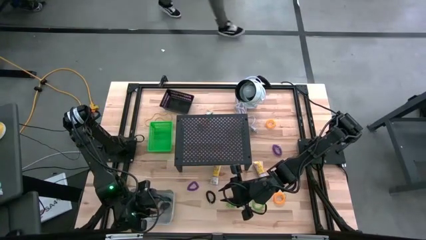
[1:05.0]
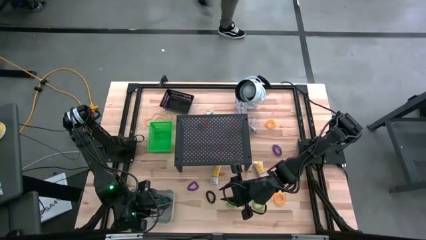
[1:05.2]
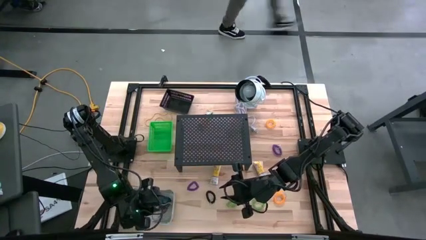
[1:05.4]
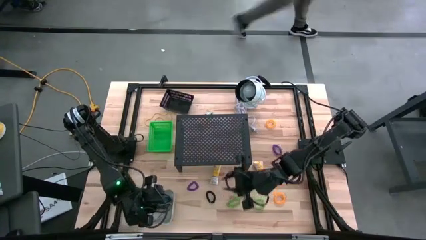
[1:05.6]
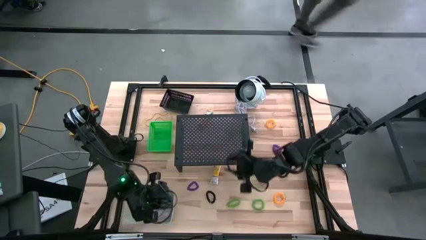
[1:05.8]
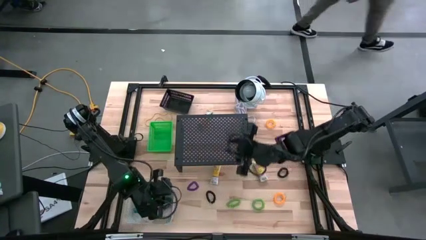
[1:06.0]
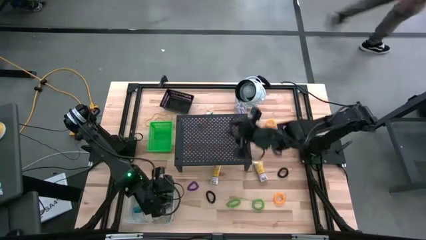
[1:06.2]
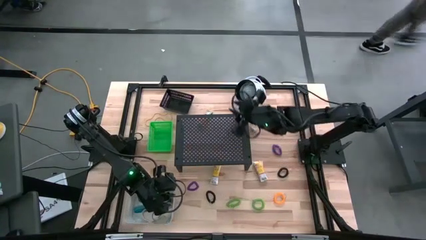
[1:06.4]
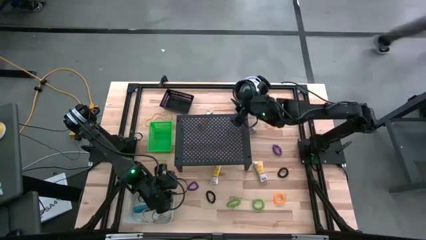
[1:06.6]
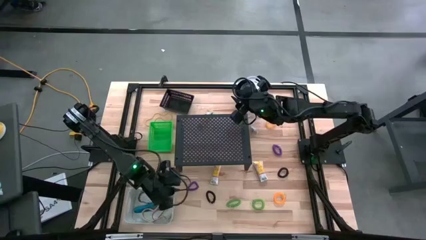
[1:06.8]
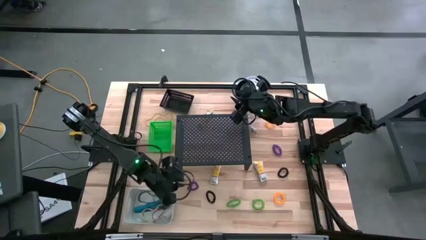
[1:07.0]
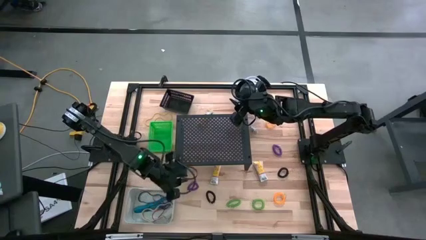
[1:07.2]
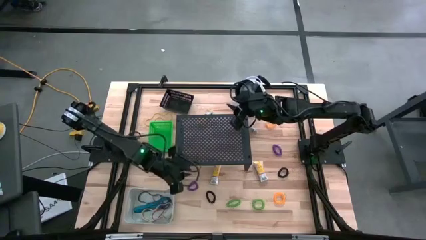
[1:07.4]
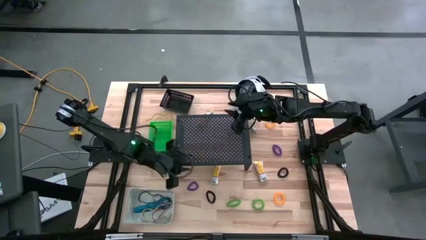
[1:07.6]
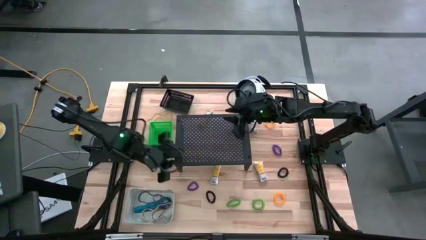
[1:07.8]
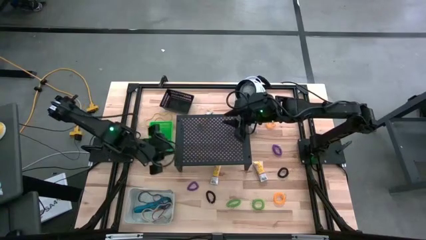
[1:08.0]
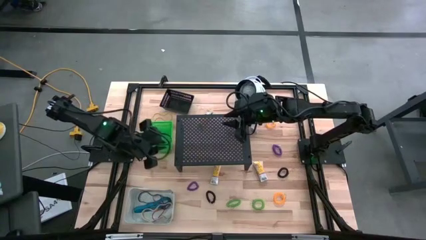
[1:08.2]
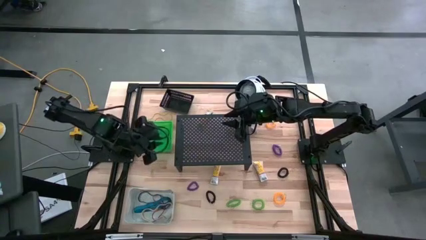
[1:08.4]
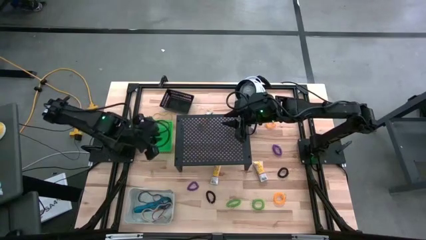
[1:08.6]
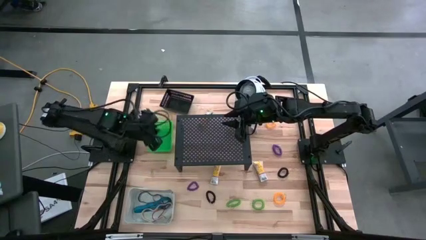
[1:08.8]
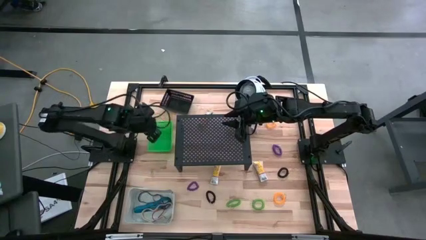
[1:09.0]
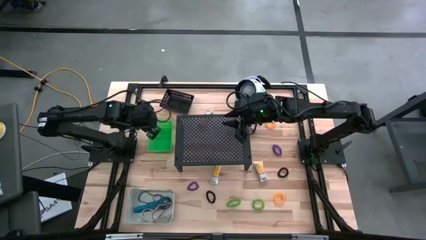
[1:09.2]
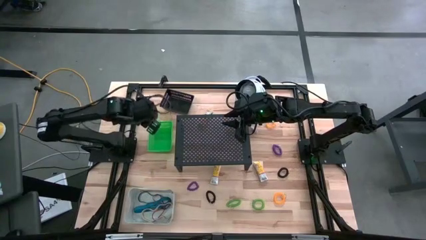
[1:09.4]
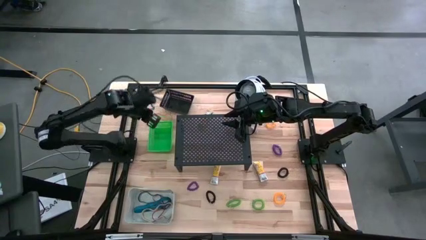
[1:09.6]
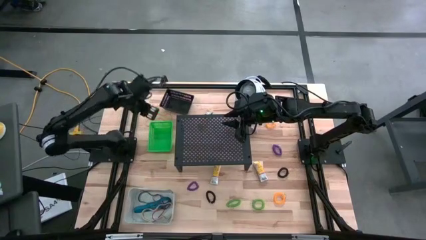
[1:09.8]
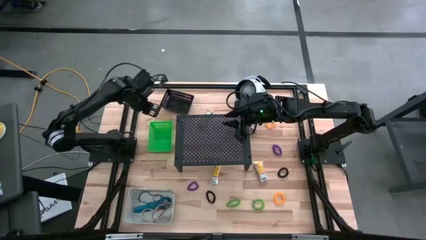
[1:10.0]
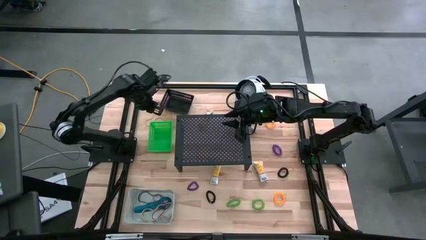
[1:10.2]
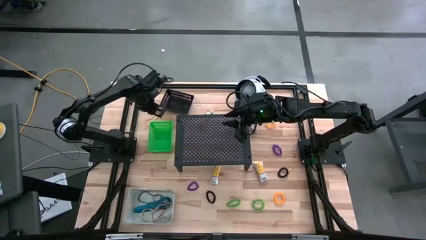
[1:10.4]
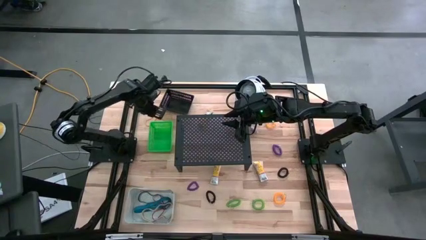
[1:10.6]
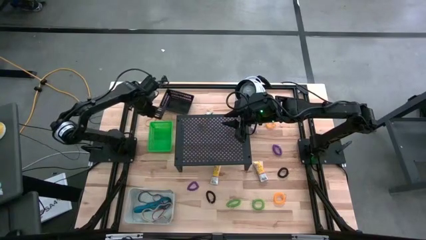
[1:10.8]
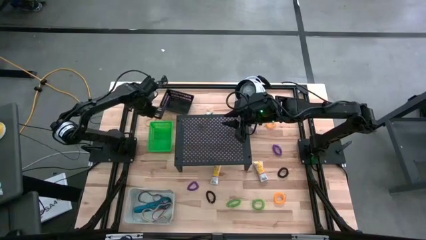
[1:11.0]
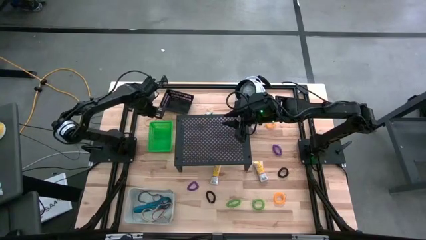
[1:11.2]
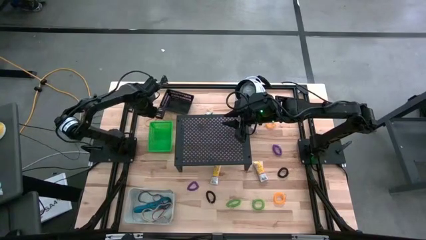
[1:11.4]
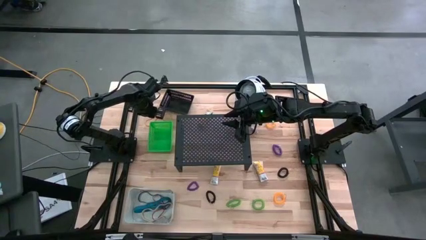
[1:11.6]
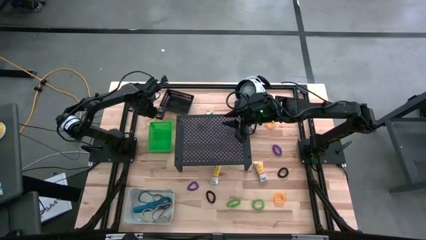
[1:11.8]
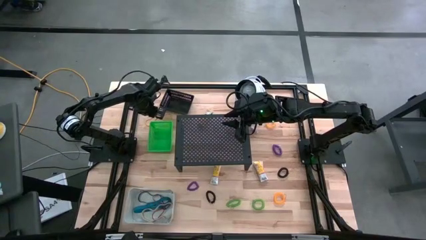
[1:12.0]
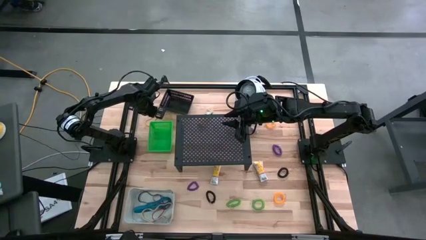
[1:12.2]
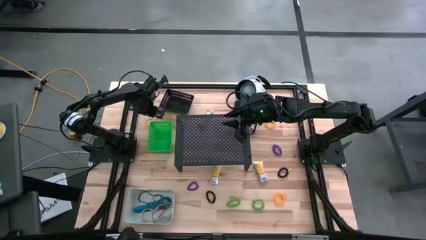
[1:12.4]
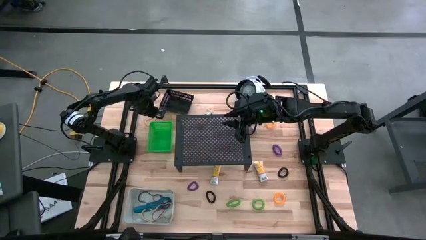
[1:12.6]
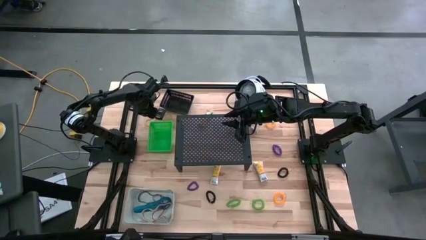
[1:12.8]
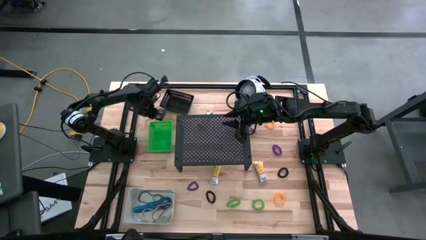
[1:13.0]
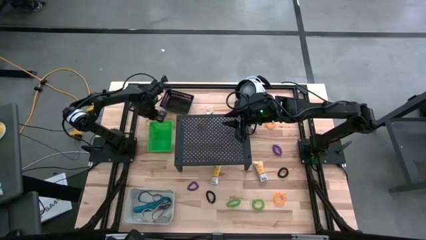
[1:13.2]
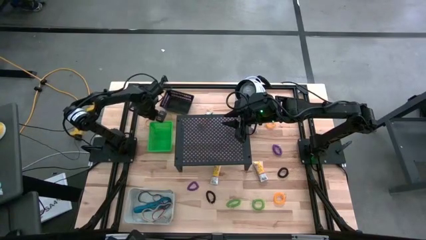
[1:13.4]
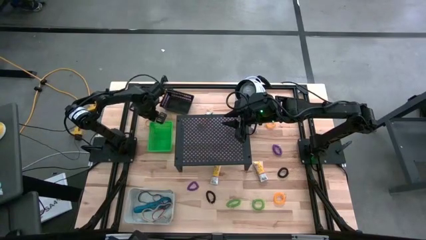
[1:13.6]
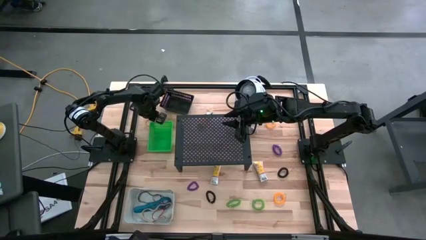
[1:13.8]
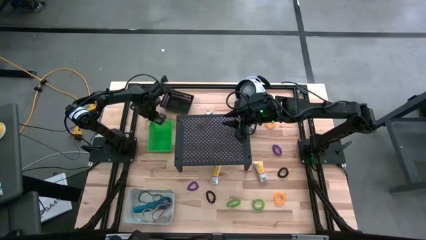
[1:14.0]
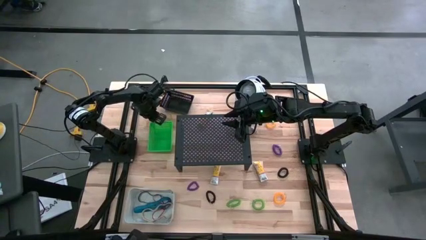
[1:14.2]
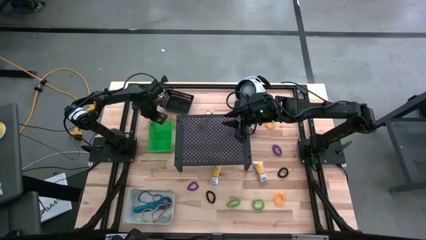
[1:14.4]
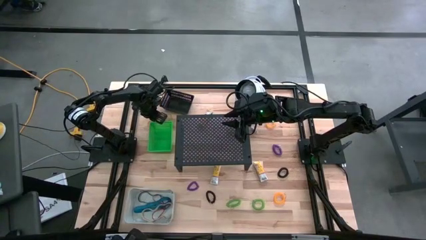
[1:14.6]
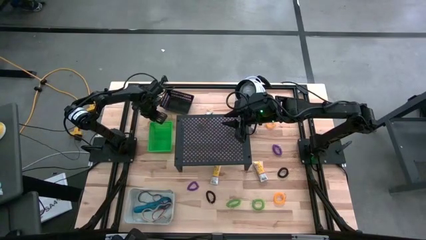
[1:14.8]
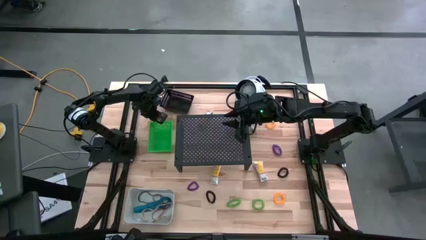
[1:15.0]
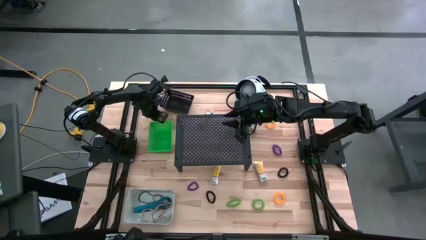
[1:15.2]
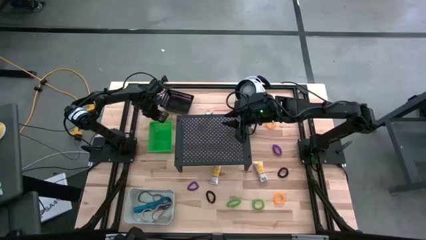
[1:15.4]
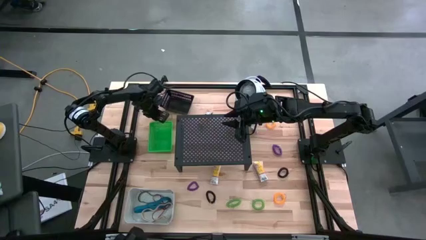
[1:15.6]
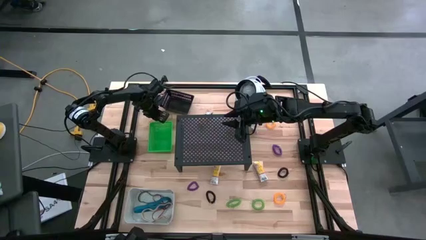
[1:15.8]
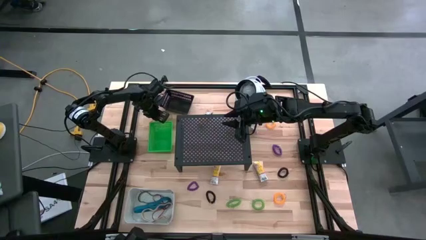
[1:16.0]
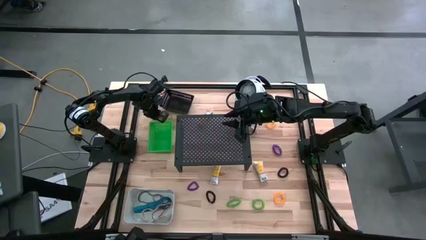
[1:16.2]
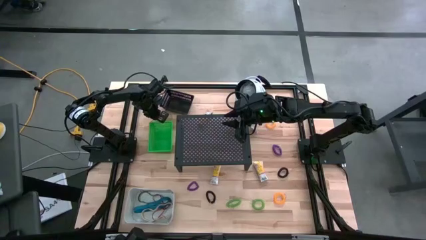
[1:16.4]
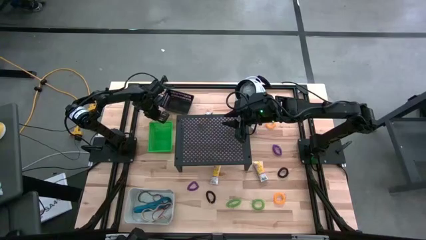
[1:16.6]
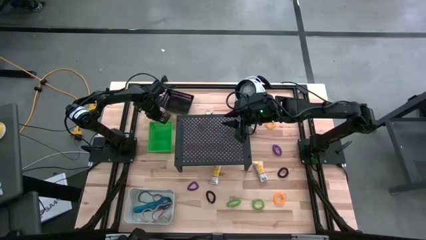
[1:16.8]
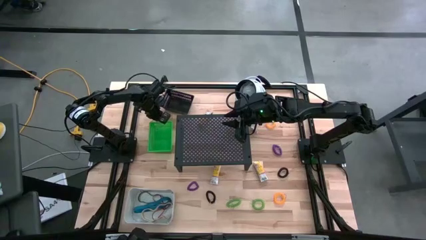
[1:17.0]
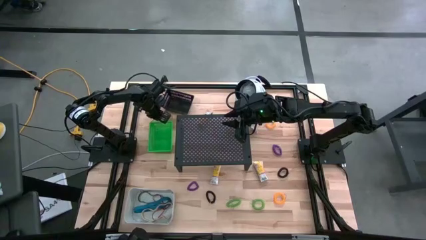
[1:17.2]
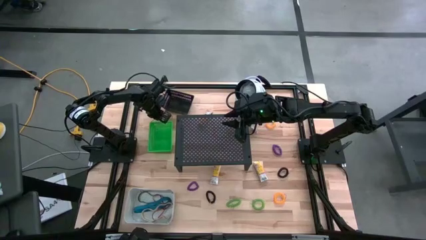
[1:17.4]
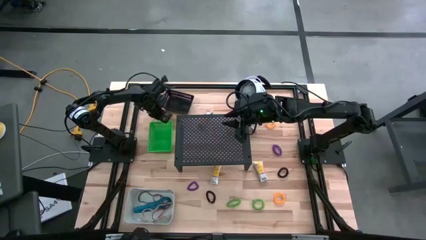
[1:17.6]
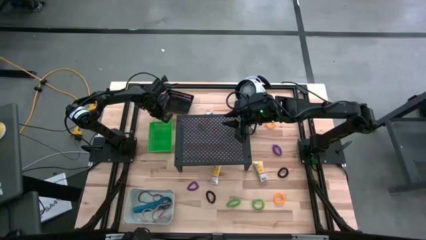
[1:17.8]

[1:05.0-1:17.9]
Task: Pick & Place Office Desk Supplies
Put the yellow rubber band into the white bin

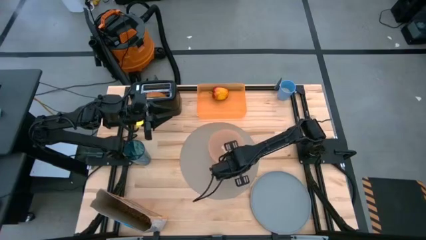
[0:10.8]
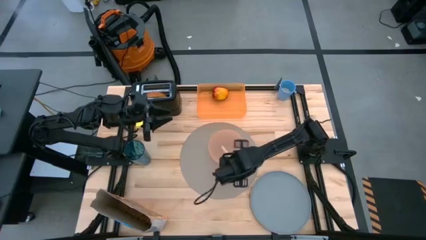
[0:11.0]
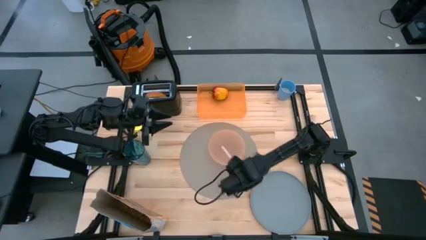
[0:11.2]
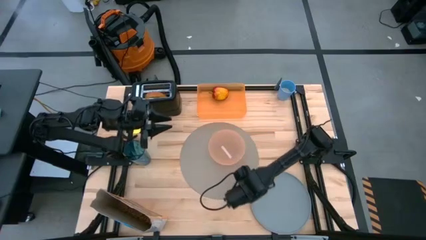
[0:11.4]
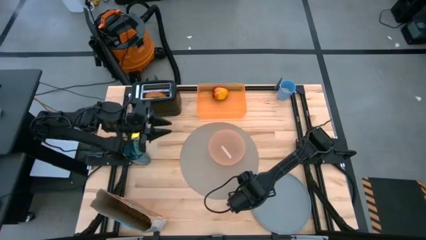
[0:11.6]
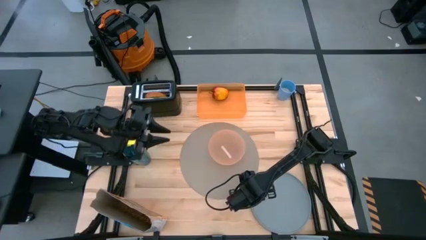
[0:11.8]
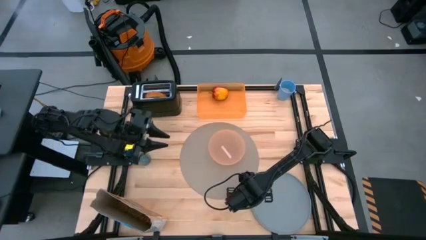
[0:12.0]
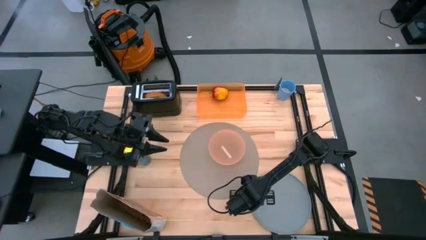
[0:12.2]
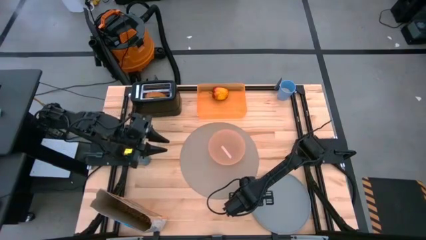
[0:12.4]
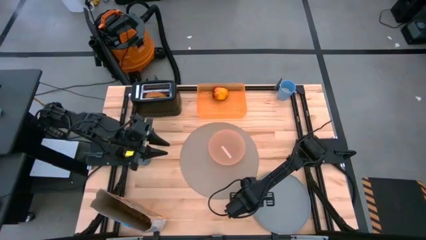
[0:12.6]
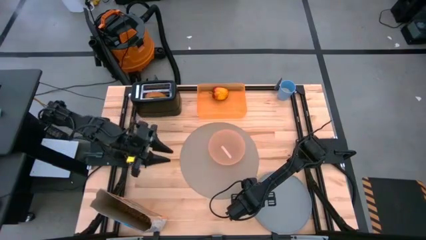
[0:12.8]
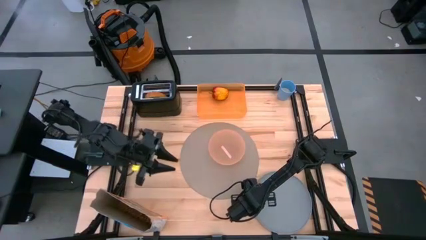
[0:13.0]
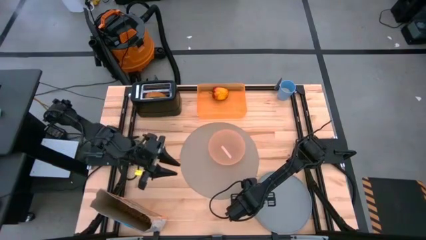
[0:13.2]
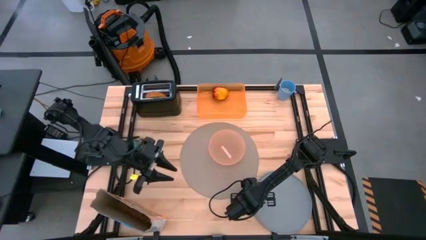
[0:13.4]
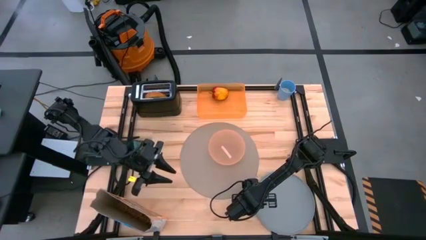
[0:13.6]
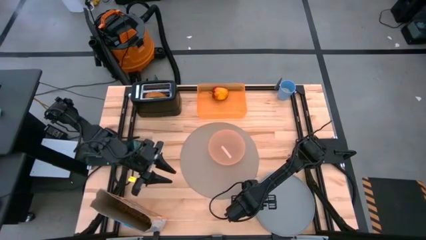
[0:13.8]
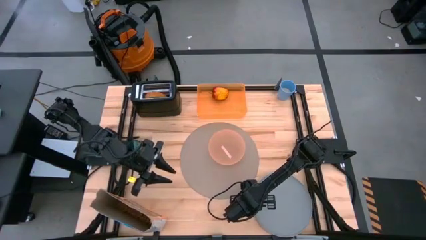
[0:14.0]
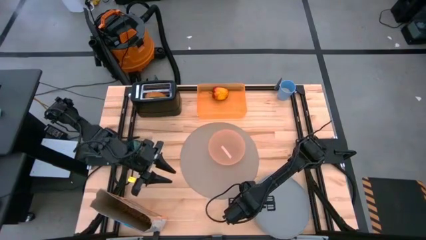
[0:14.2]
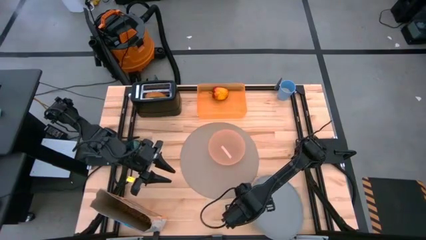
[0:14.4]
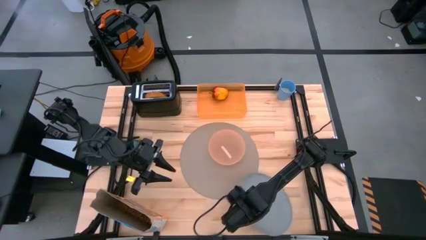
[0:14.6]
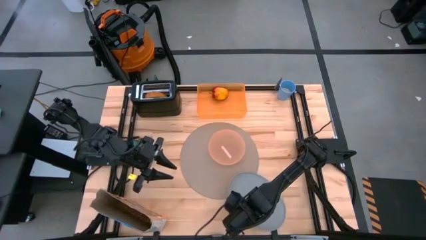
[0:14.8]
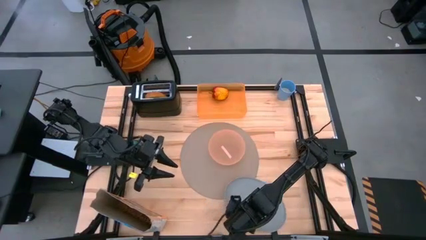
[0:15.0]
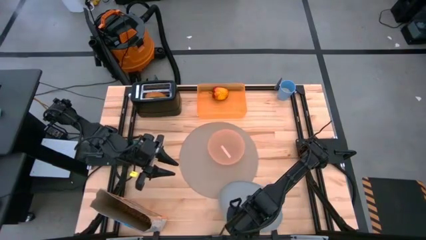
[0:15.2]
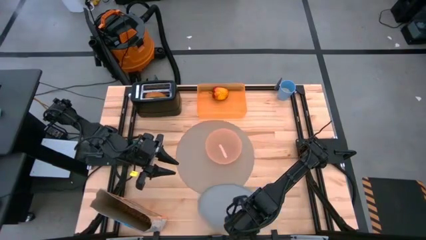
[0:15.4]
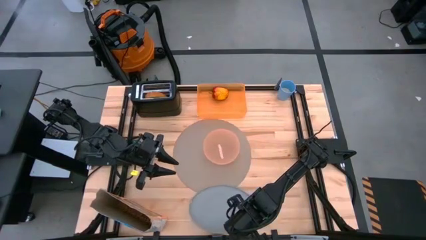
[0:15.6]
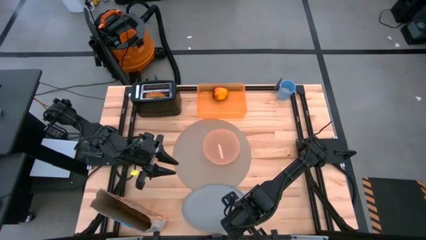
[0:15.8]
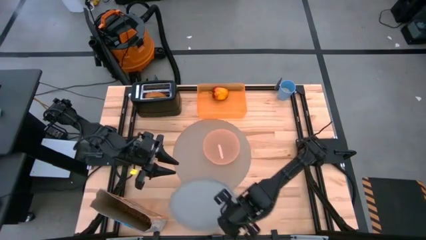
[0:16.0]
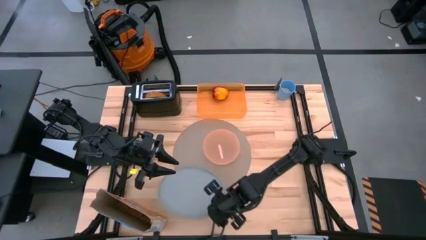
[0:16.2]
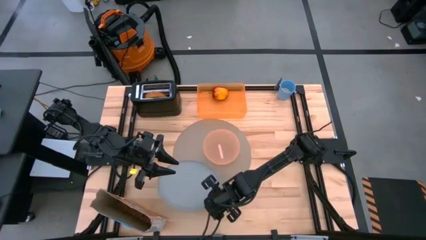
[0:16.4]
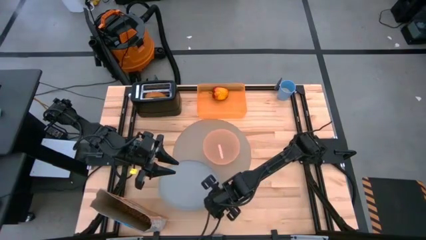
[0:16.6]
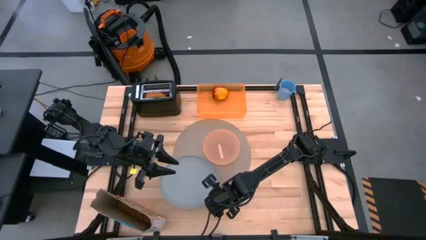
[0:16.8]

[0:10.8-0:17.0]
Task: Arrange a breakfast setting
Put the blue plate on the gray placemat
